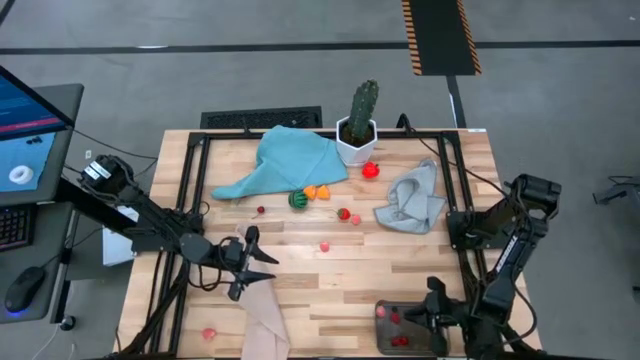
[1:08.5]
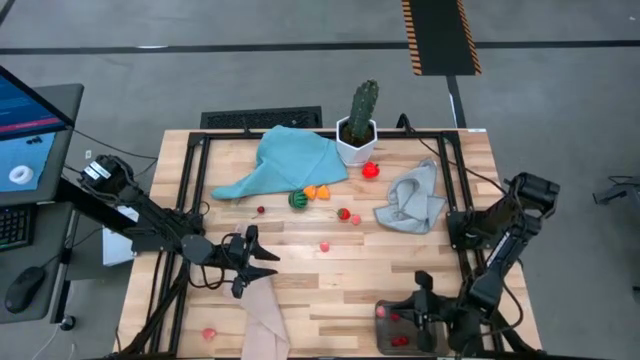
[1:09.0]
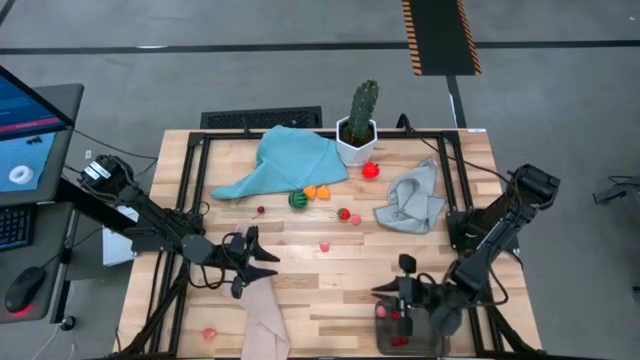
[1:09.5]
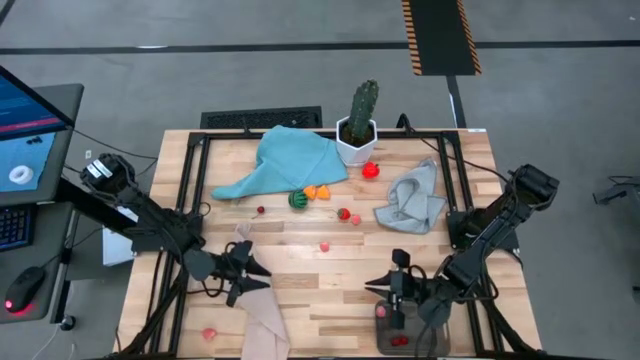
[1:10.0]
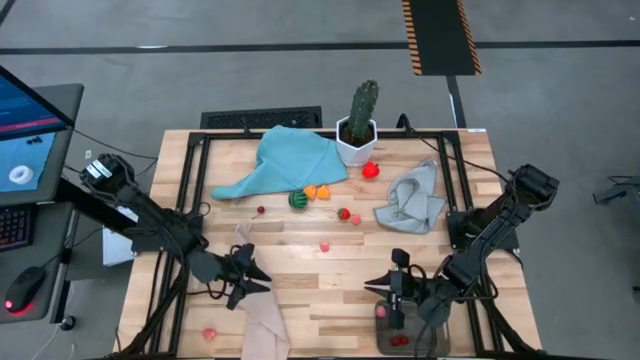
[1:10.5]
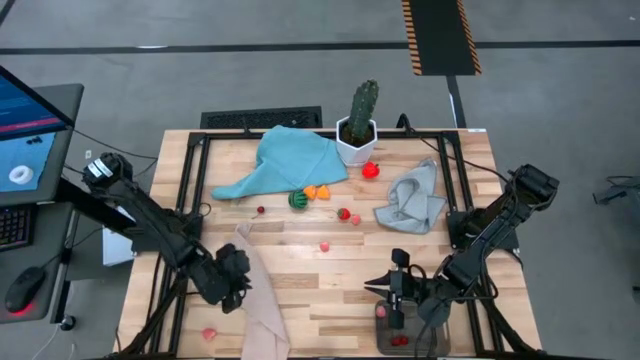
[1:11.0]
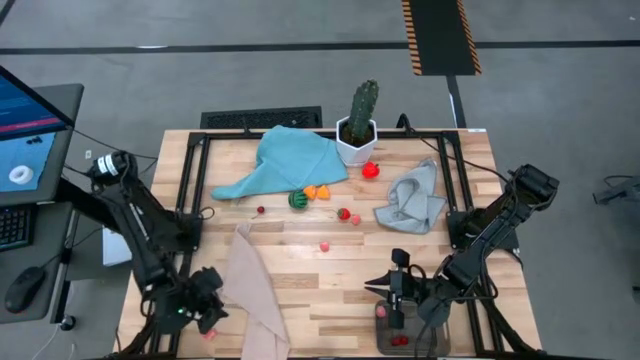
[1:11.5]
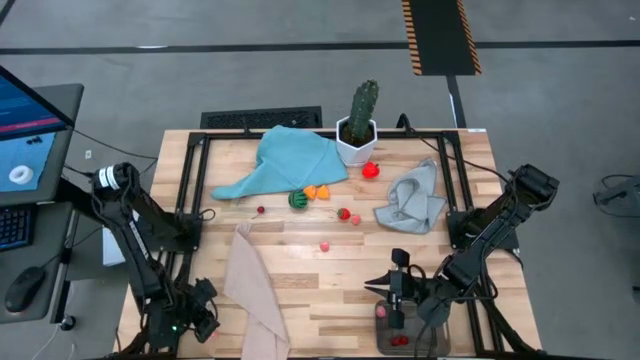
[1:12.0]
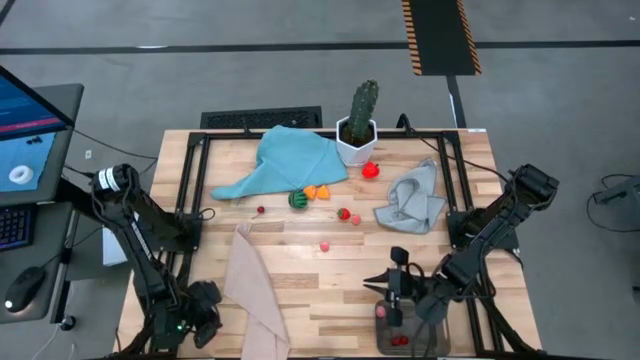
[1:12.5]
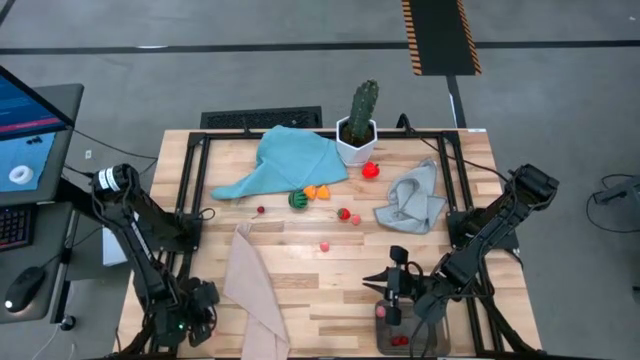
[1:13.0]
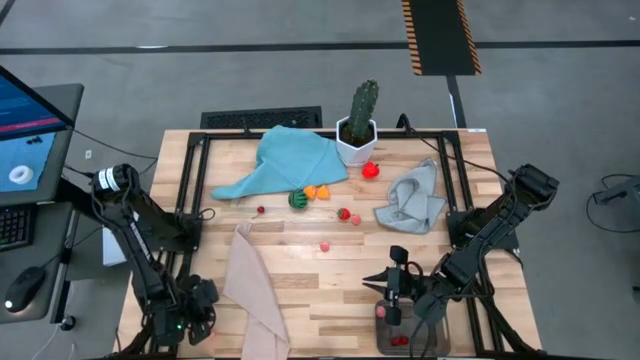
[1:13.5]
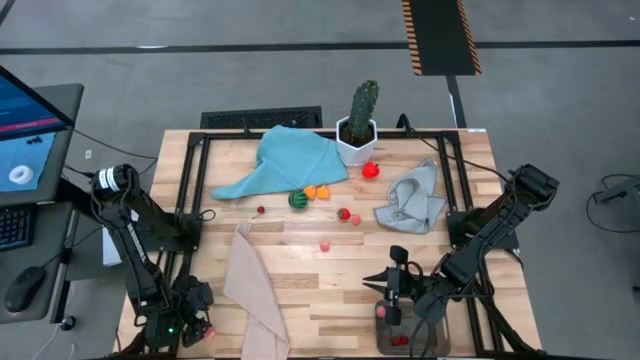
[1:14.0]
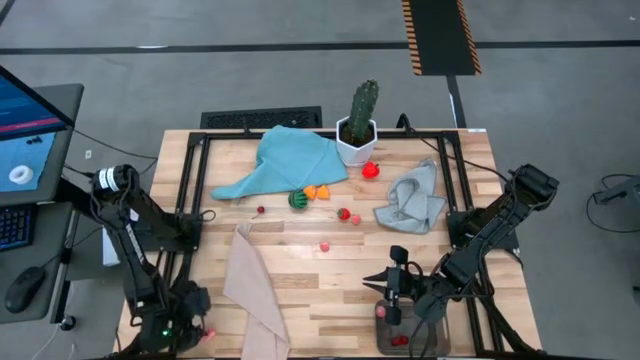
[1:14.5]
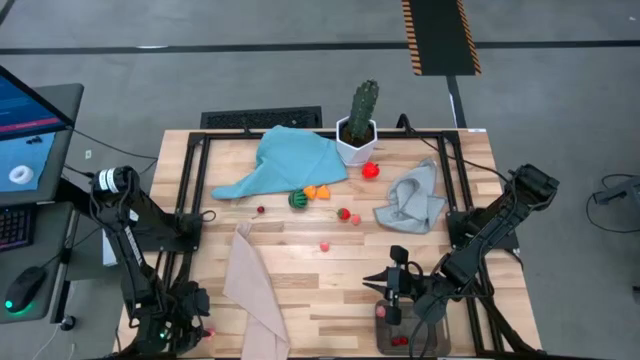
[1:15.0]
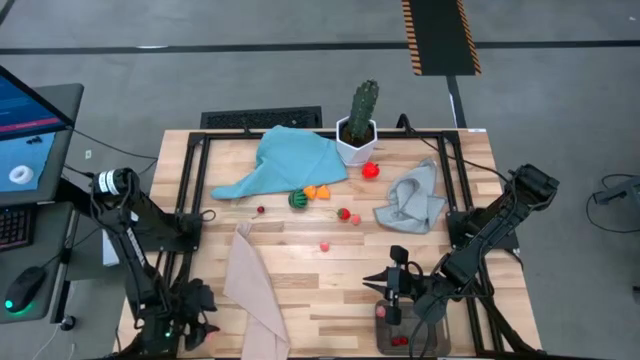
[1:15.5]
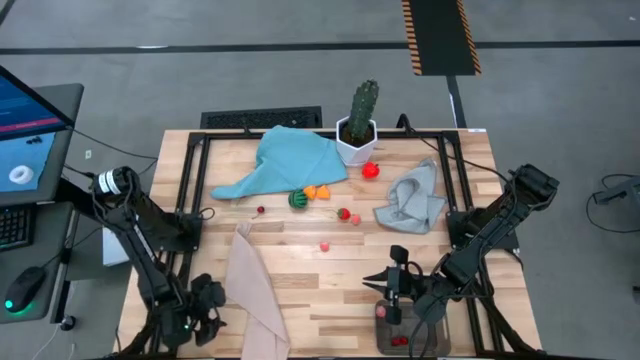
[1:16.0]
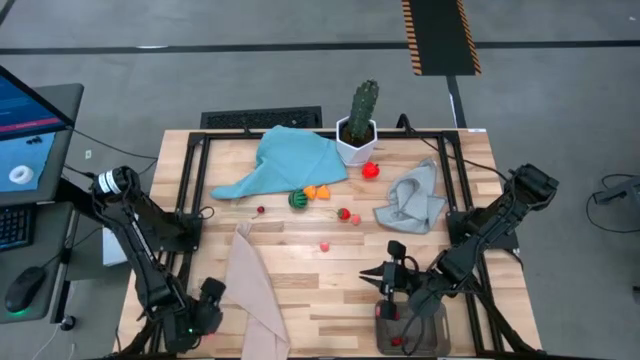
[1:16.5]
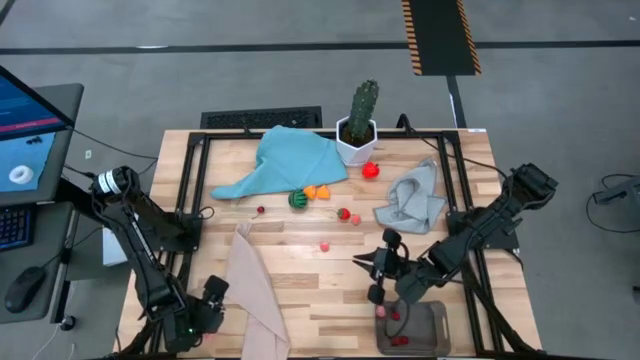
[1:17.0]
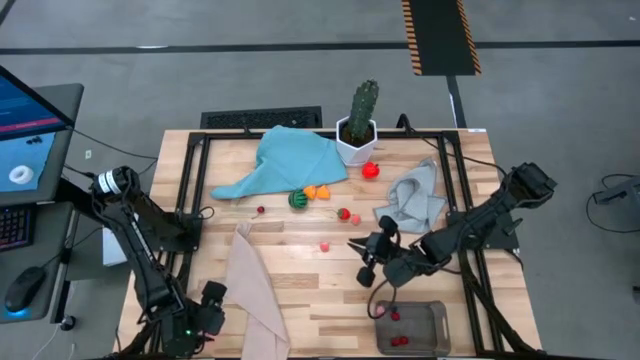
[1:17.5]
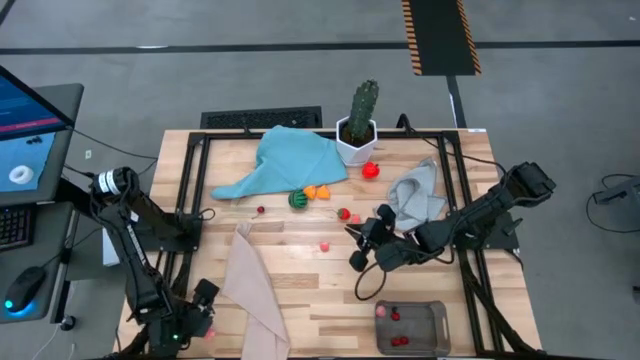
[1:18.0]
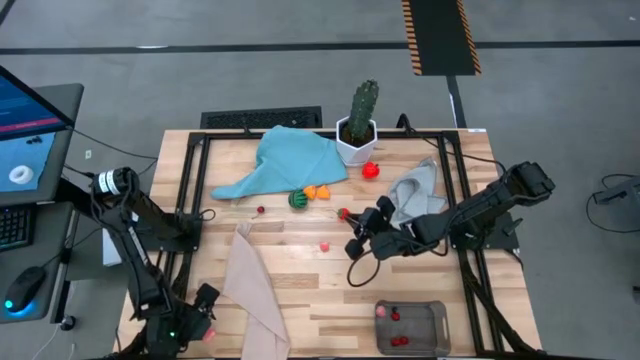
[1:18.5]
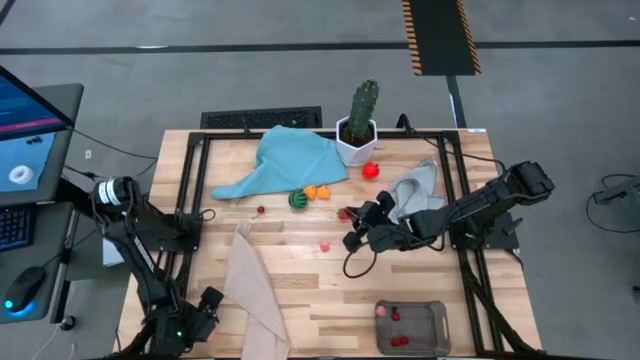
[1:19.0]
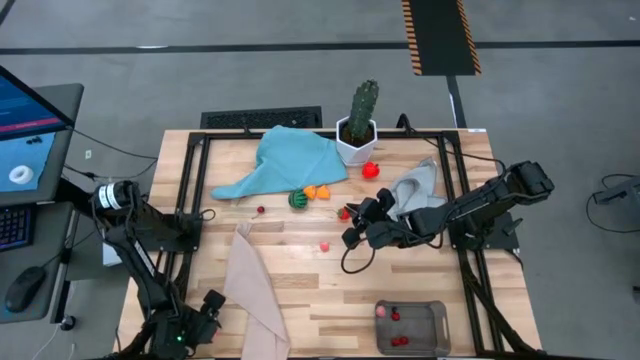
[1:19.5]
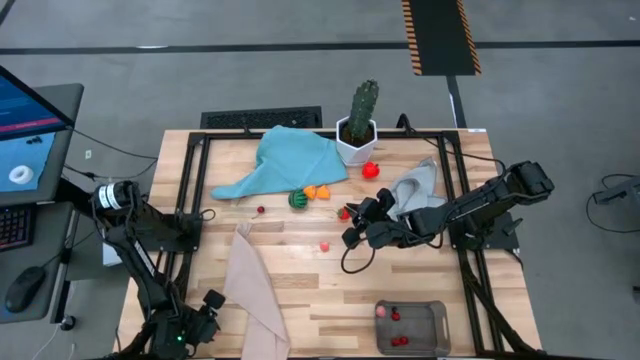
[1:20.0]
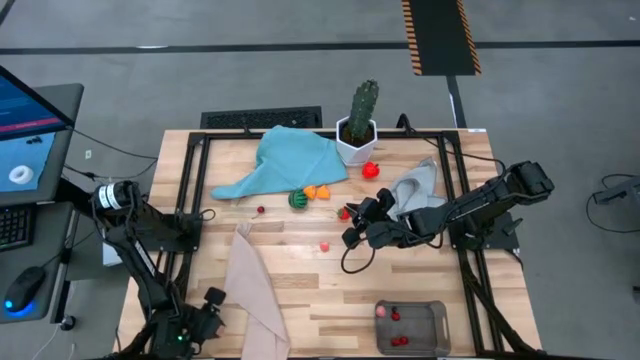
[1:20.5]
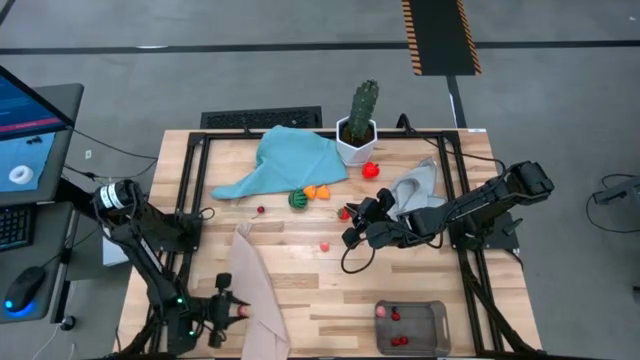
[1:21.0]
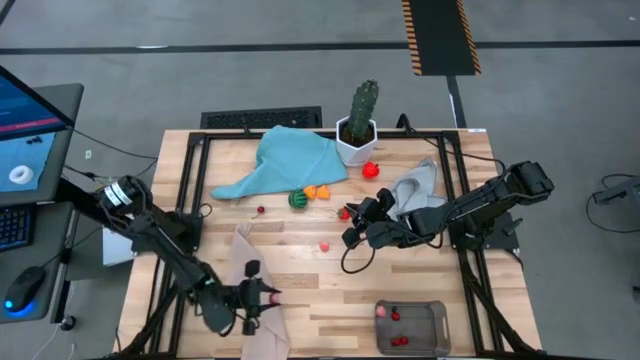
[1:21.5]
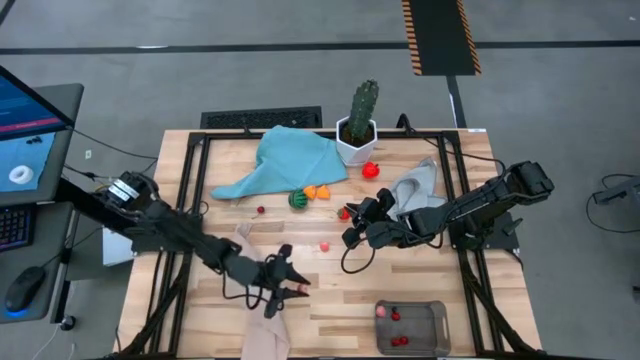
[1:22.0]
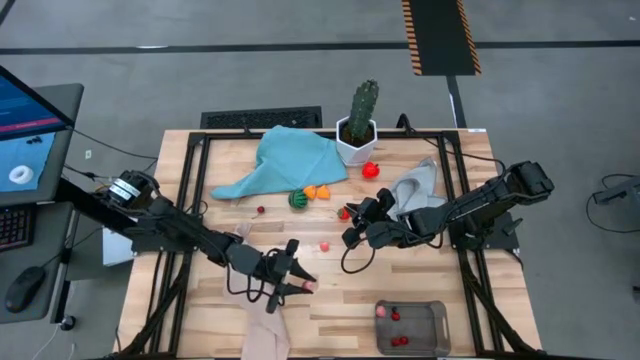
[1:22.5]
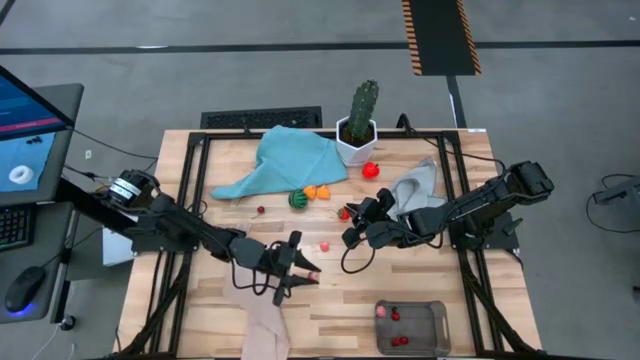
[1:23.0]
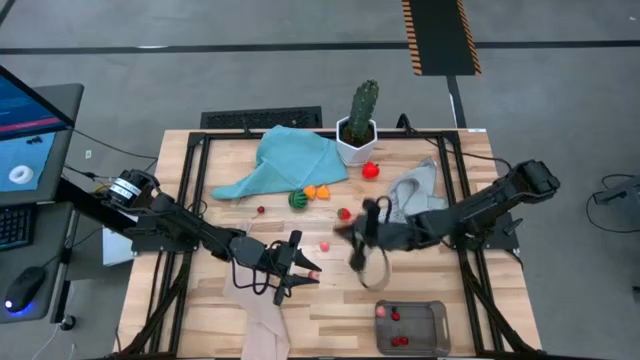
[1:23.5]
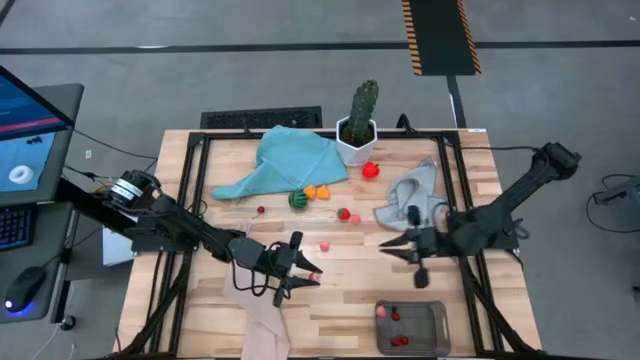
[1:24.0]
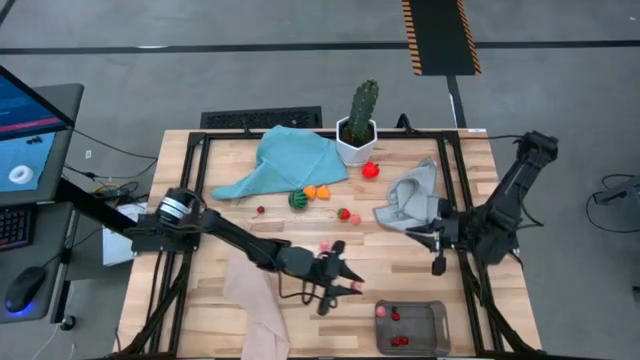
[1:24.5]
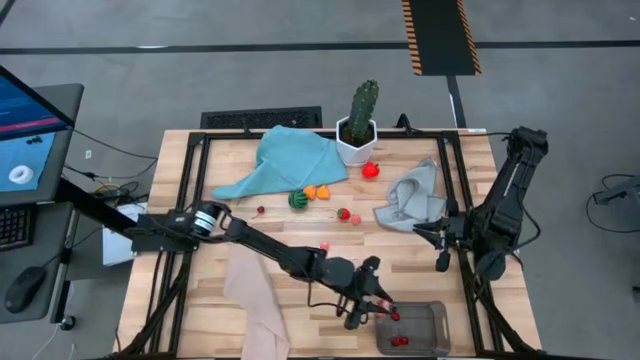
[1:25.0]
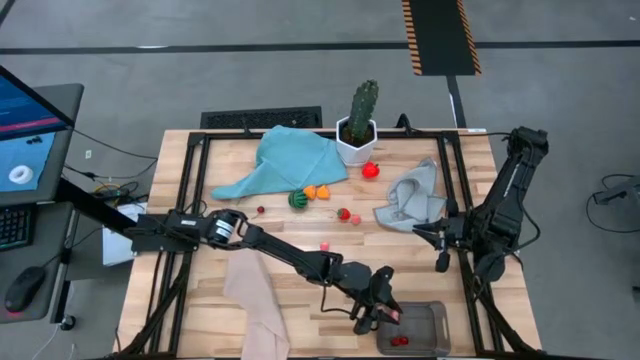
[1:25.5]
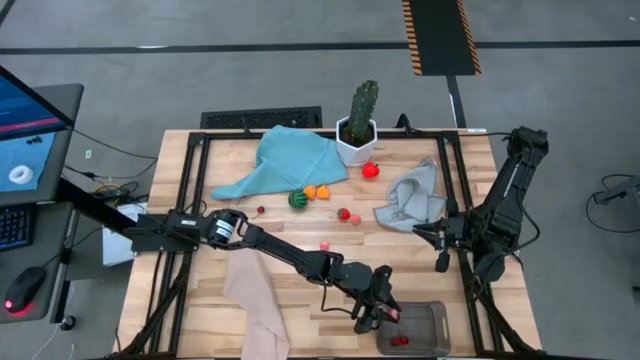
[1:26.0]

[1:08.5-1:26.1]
Task: Pick and placing Produce into tupperware
Put the peach into the black bin

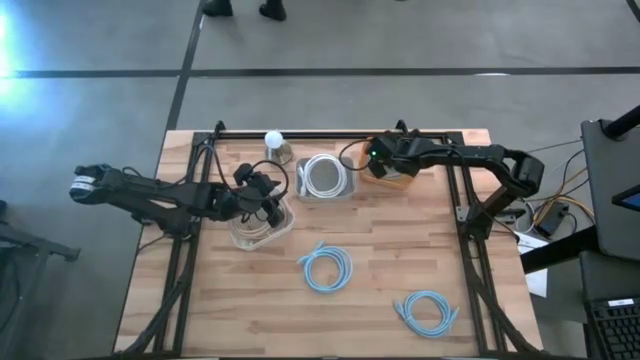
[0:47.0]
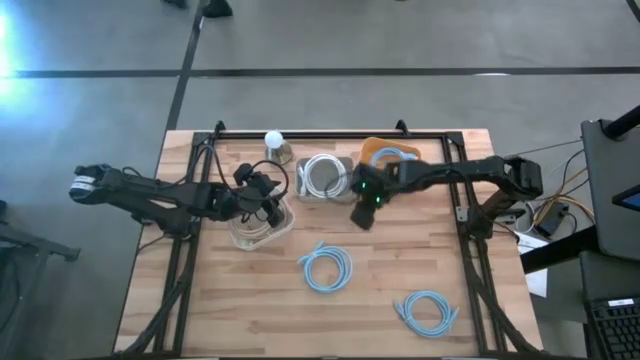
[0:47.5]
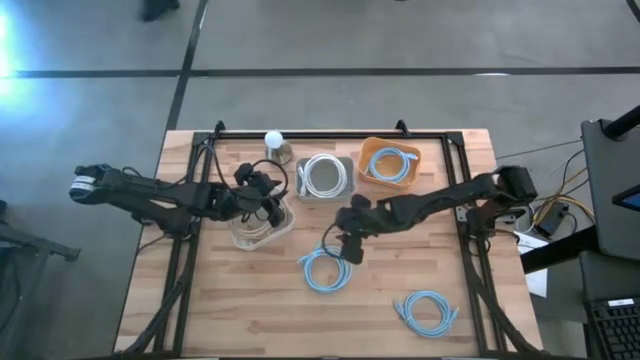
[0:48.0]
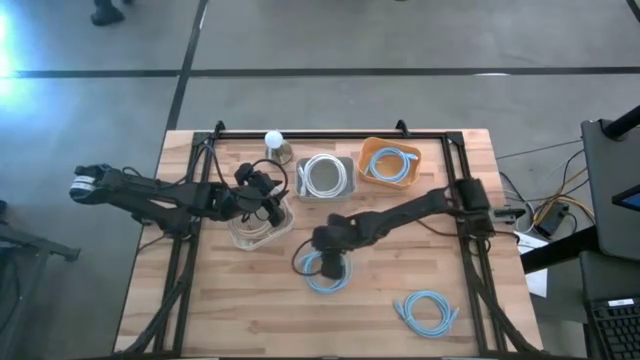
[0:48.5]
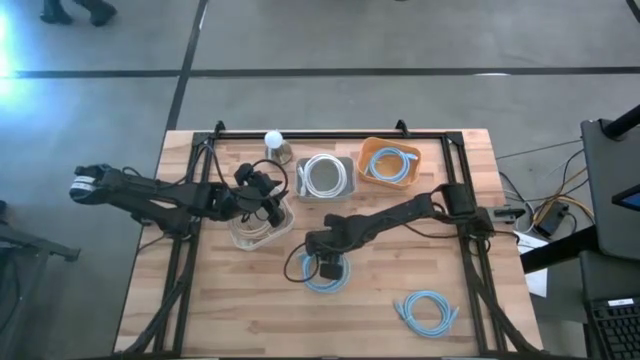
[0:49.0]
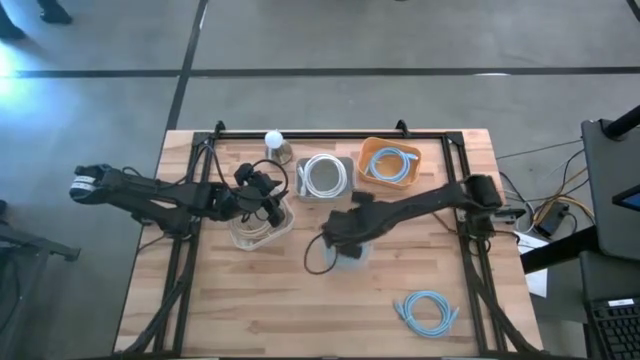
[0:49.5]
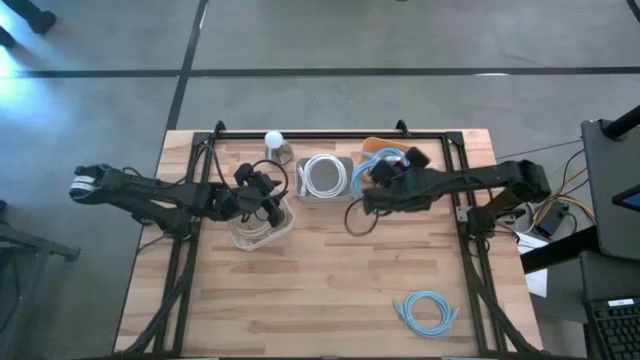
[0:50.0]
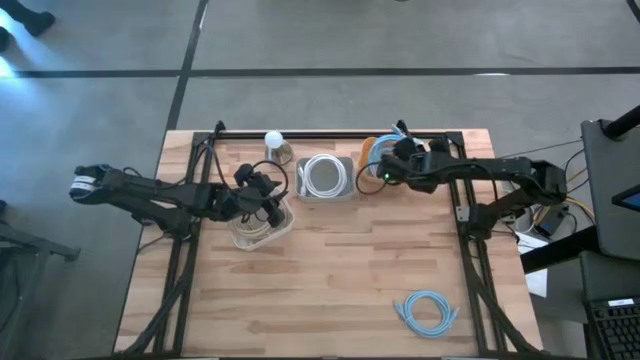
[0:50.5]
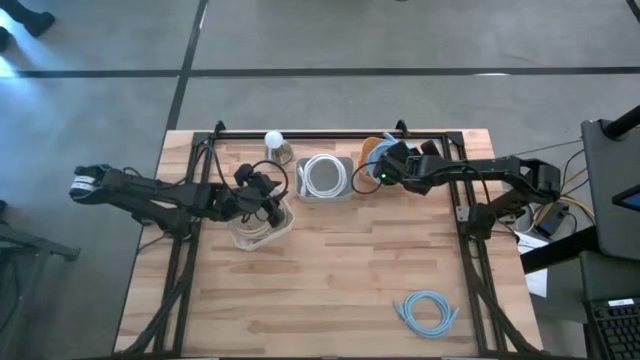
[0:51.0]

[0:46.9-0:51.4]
Task: Sort HDMI cables
Put the top blue HDMI cable into the yellow bin
